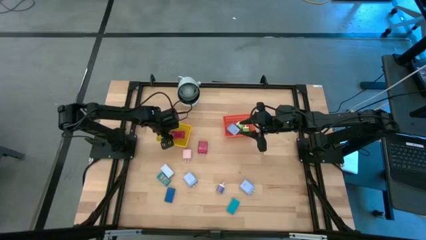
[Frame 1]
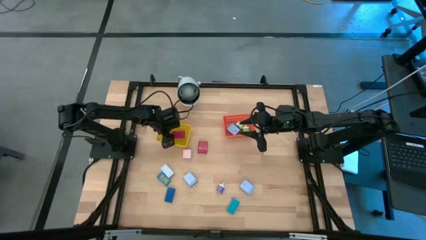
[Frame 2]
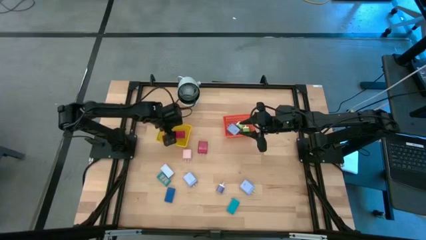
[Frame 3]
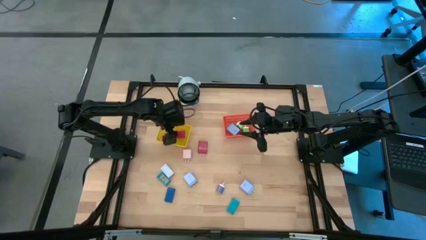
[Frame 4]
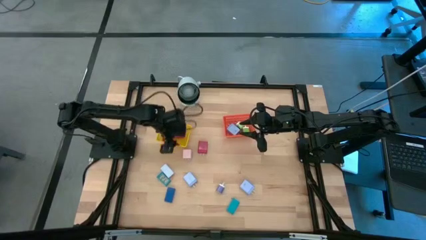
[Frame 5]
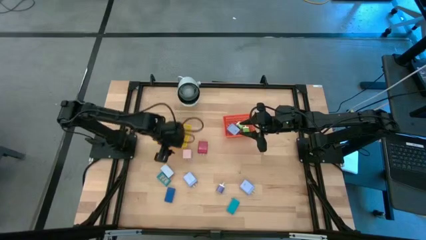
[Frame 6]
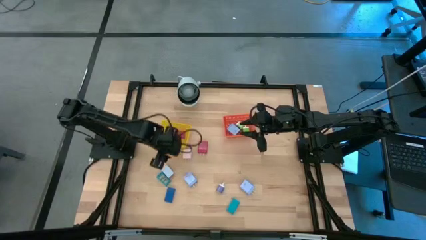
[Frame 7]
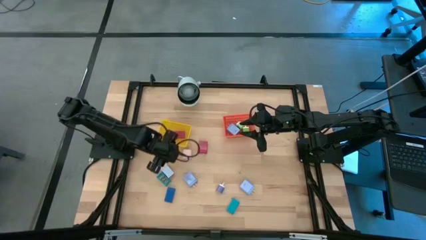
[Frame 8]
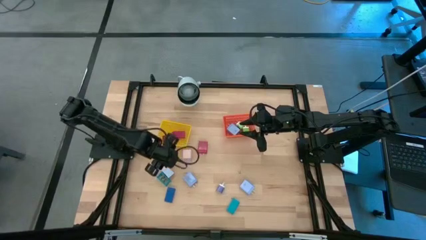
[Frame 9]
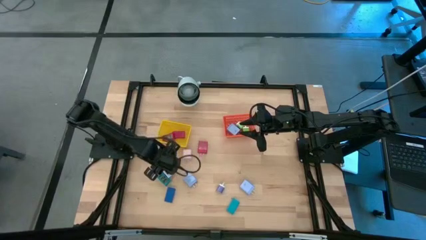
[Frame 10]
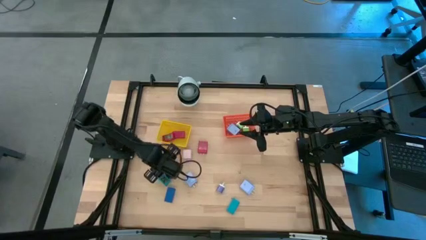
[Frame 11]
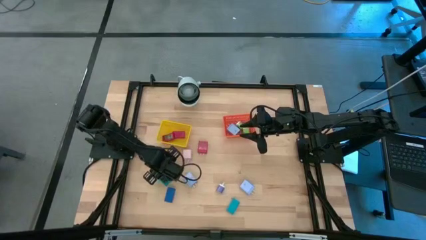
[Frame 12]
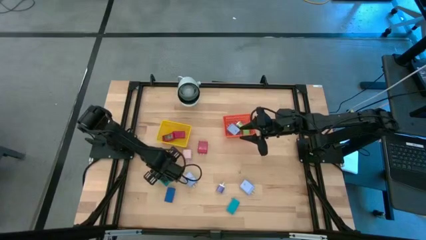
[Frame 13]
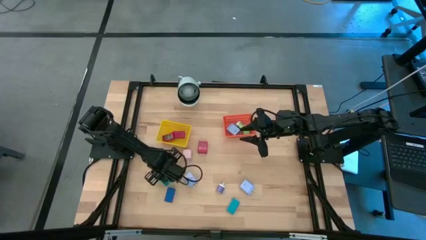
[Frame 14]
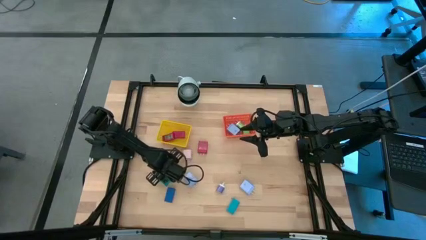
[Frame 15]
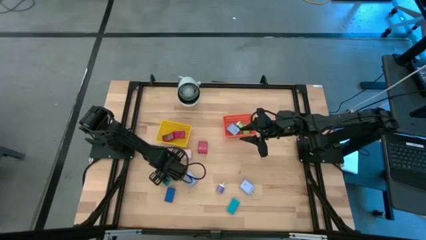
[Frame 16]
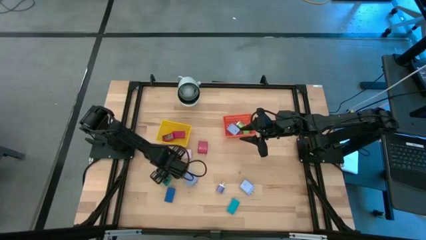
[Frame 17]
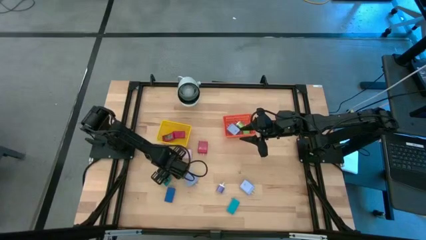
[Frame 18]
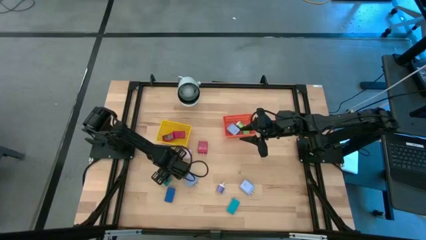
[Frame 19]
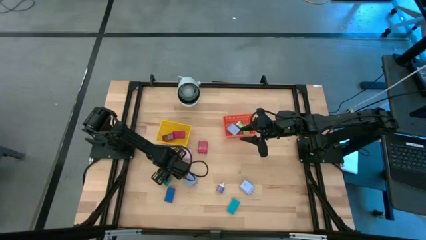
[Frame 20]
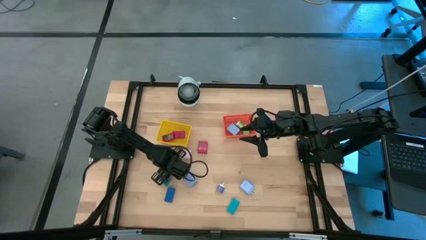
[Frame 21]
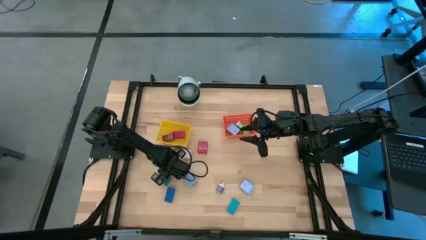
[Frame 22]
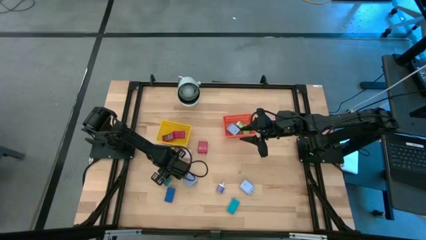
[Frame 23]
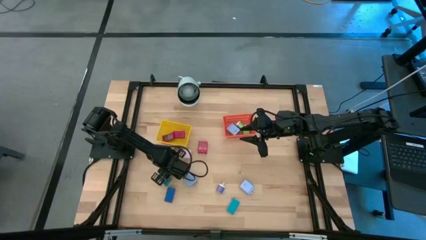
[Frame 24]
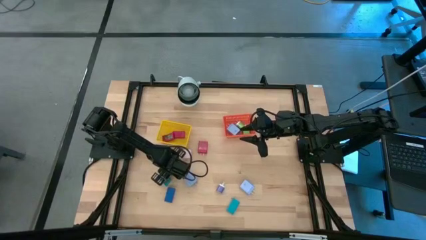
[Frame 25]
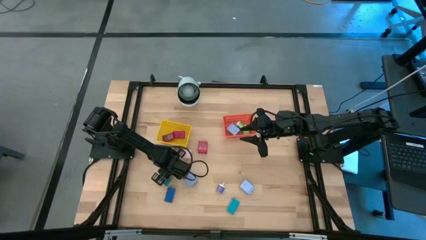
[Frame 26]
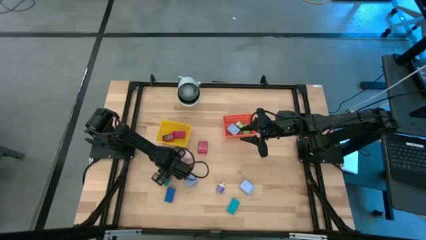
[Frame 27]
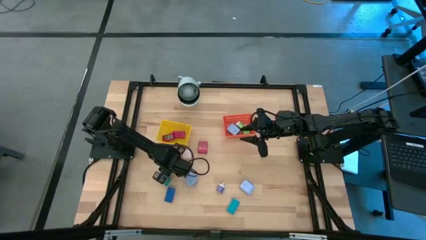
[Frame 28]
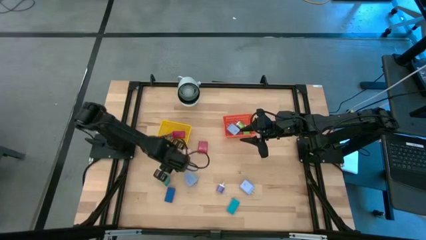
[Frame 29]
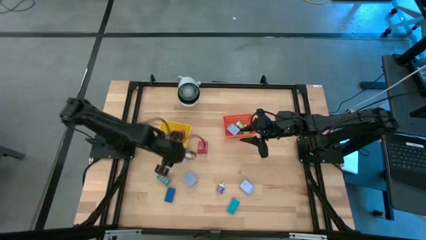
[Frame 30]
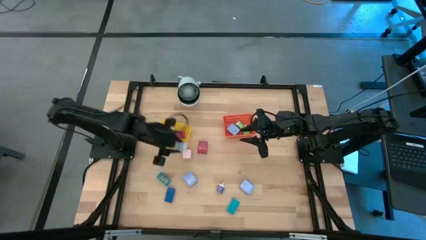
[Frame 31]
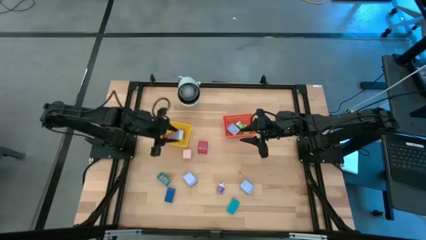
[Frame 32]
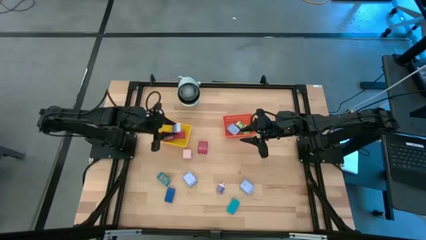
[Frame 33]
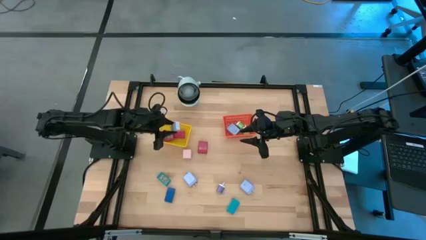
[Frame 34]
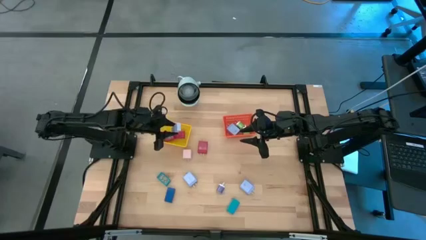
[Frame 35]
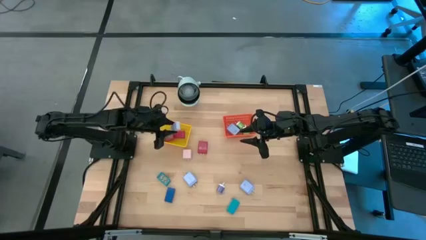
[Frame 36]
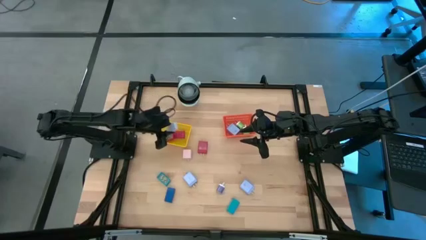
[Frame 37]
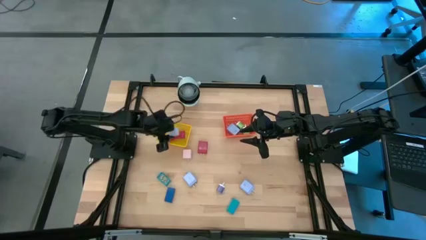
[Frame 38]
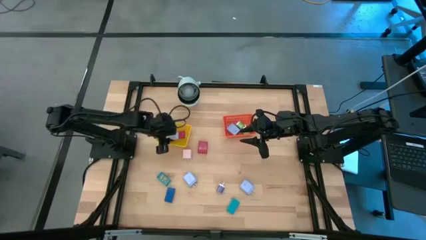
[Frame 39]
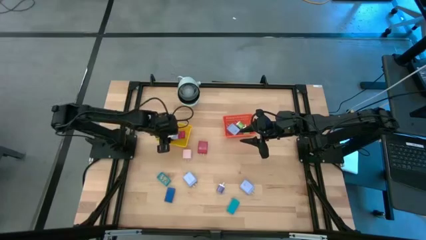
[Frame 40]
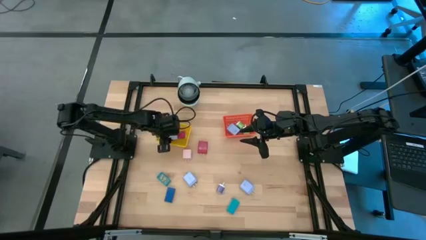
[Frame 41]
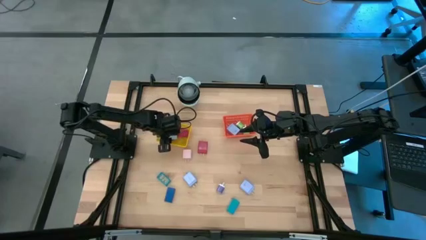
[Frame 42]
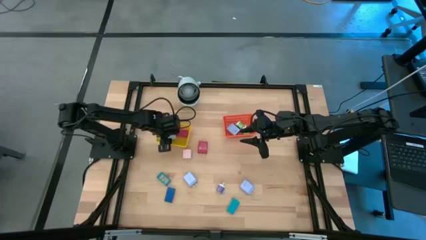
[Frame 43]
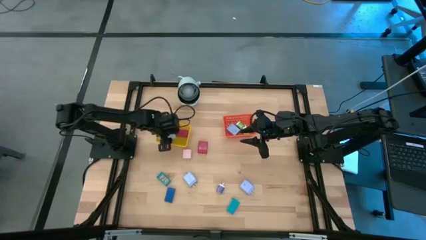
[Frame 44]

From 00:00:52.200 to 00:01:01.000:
Task: Pick & Place Office items
Put the white digital timer into the yellow bin
